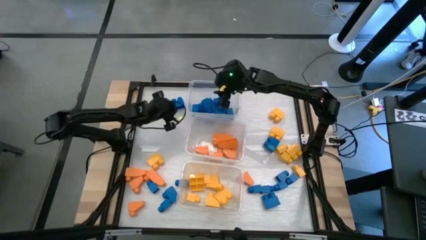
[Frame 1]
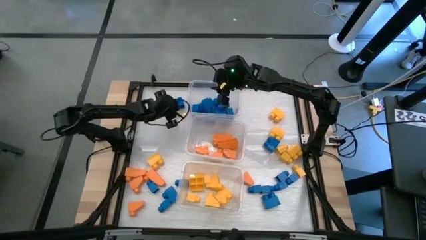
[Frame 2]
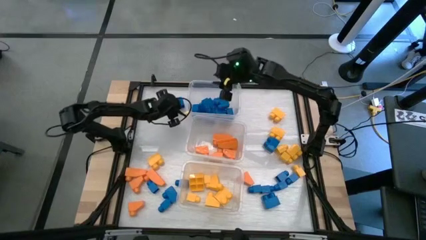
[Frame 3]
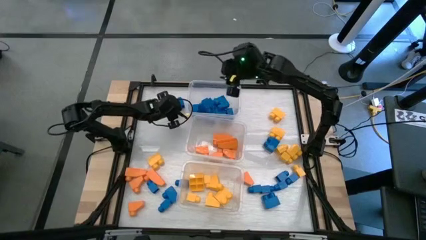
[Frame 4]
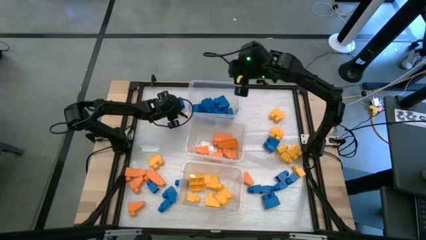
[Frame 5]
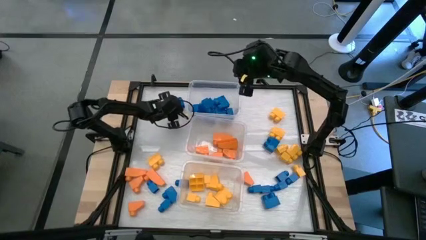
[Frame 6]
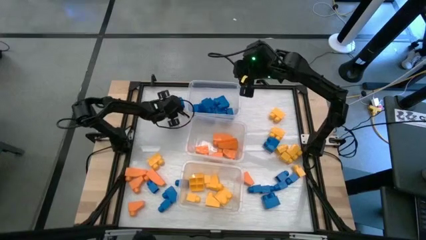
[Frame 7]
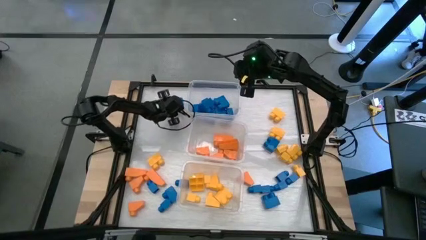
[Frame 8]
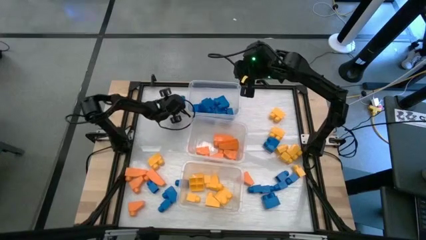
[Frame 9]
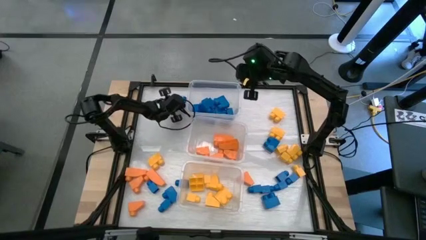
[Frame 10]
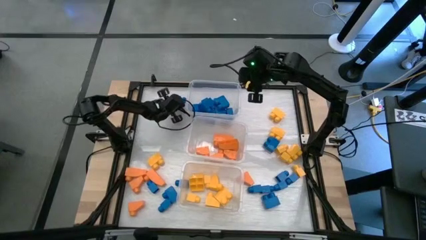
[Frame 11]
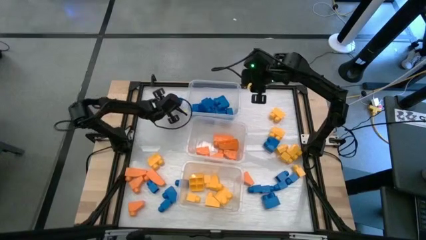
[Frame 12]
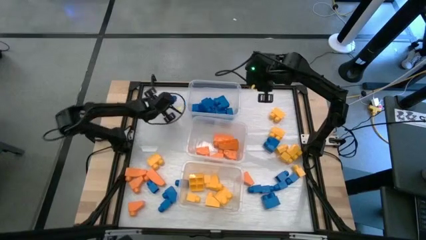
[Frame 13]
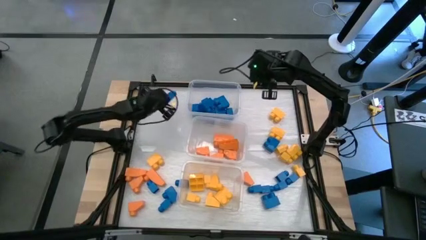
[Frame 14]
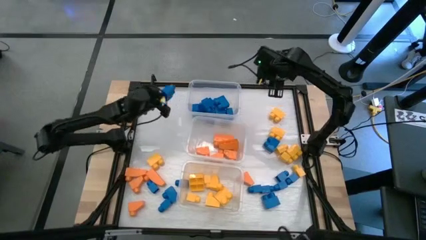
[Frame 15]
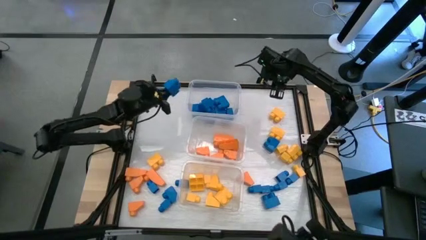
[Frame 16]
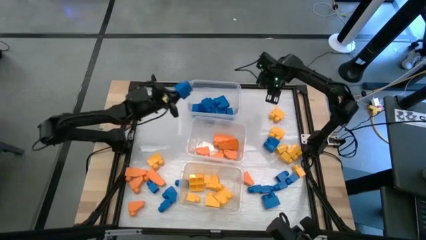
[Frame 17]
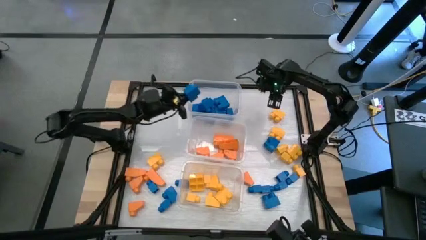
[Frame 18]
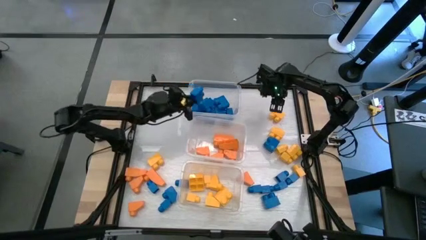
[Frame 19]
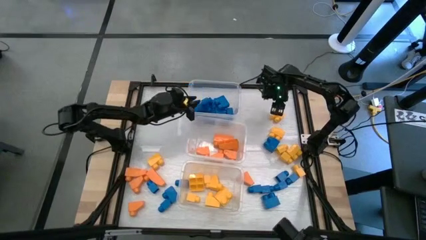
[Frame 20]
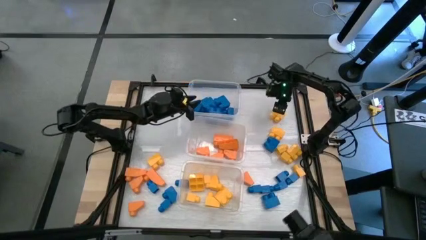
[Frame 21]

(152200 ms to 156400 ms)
Task: Sort blocks
Put the blue game piece into the top transparent bin

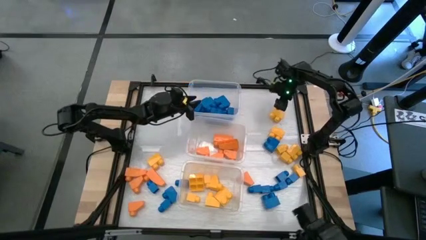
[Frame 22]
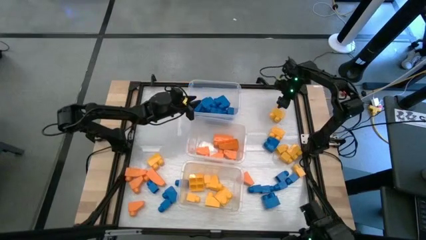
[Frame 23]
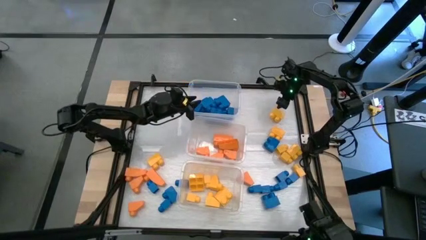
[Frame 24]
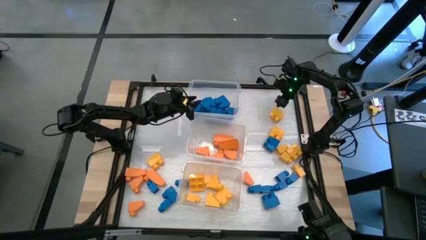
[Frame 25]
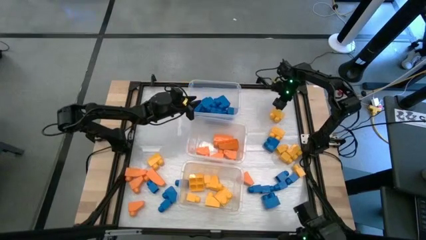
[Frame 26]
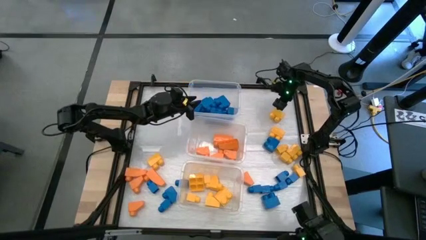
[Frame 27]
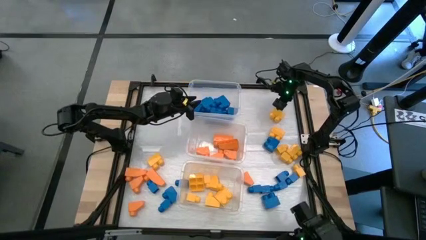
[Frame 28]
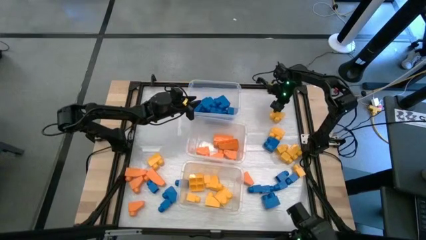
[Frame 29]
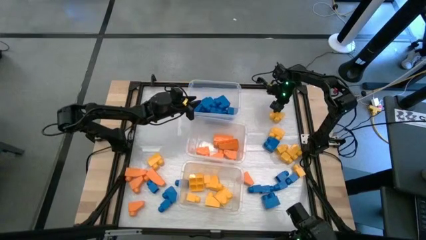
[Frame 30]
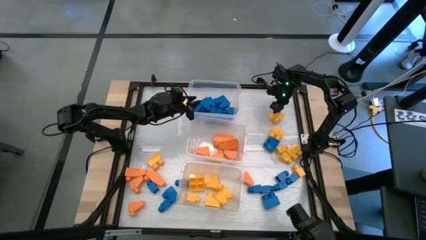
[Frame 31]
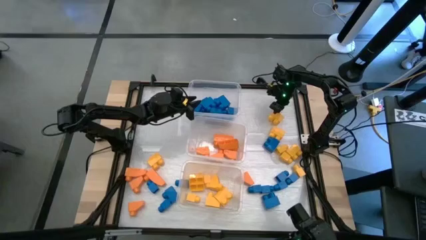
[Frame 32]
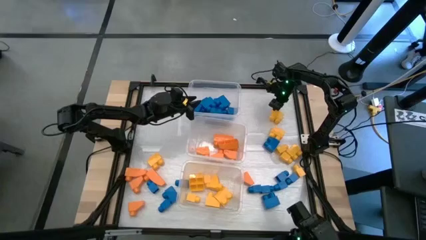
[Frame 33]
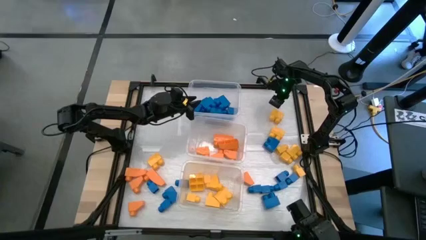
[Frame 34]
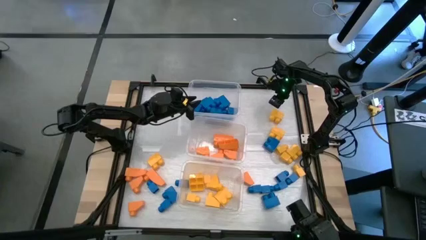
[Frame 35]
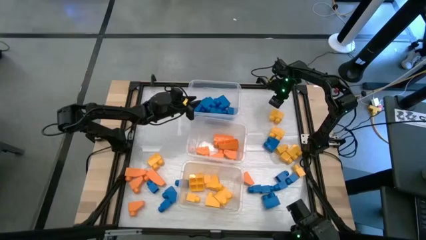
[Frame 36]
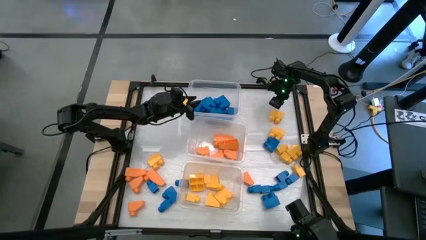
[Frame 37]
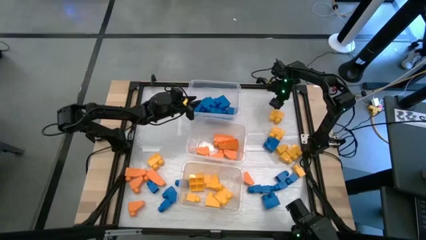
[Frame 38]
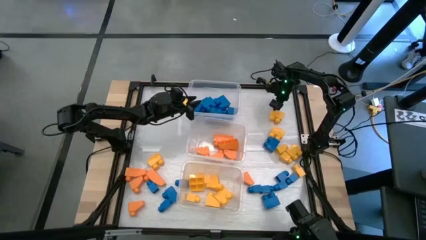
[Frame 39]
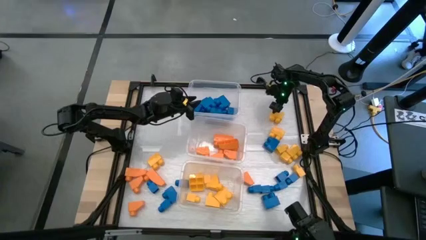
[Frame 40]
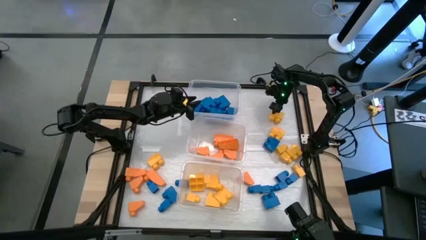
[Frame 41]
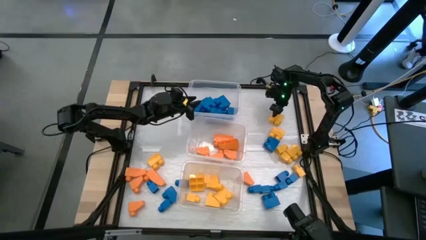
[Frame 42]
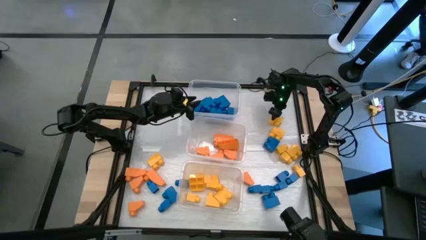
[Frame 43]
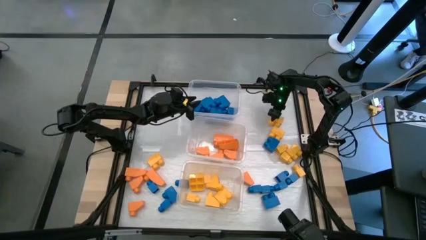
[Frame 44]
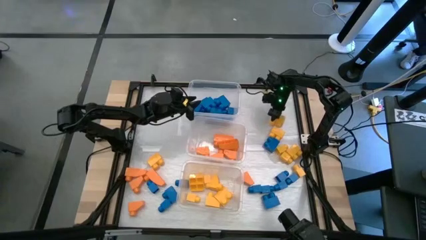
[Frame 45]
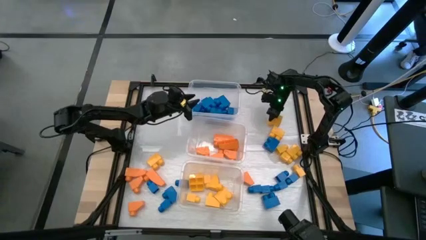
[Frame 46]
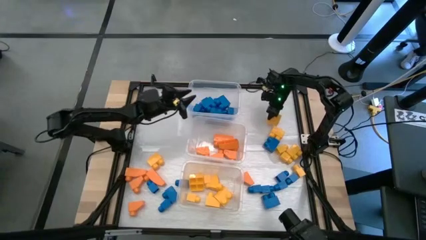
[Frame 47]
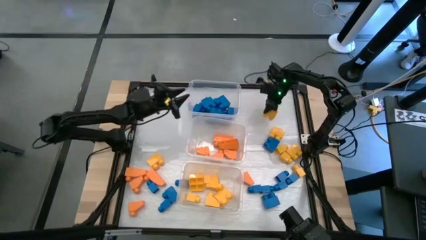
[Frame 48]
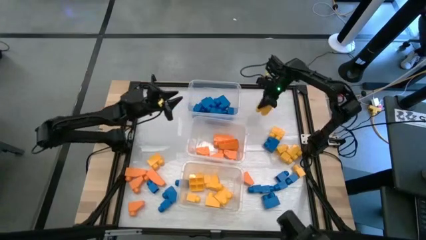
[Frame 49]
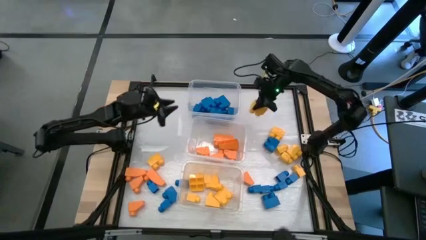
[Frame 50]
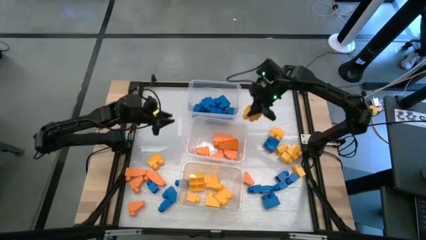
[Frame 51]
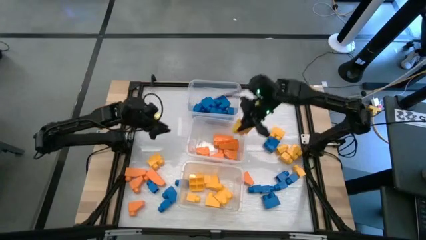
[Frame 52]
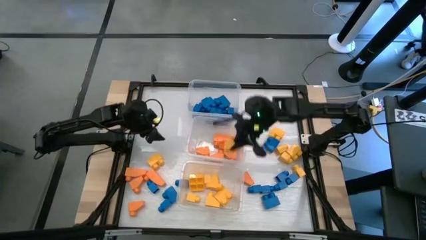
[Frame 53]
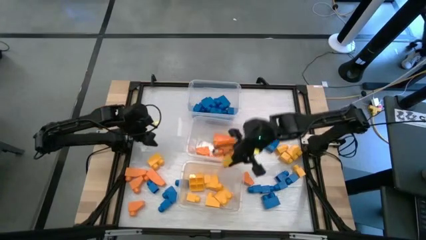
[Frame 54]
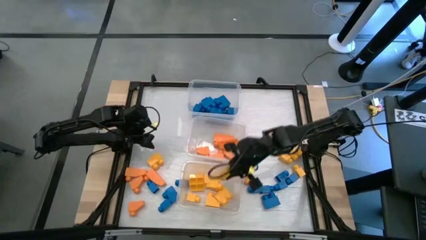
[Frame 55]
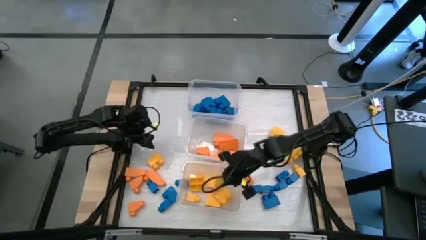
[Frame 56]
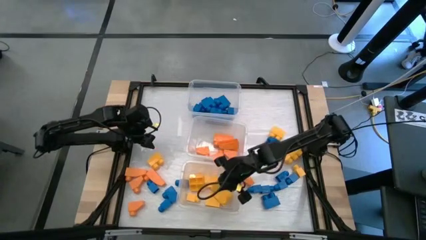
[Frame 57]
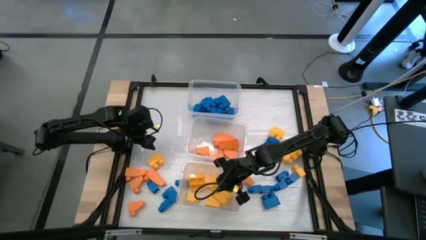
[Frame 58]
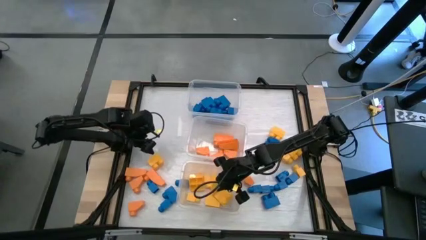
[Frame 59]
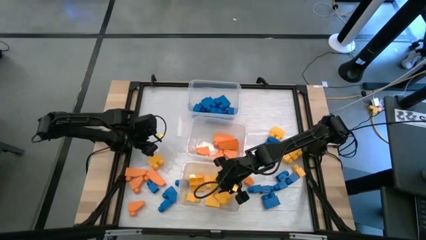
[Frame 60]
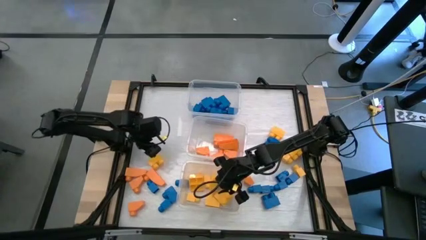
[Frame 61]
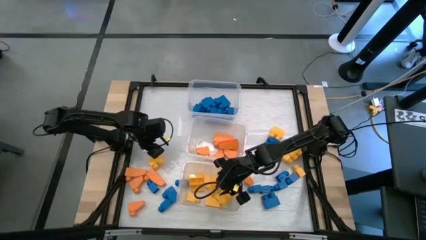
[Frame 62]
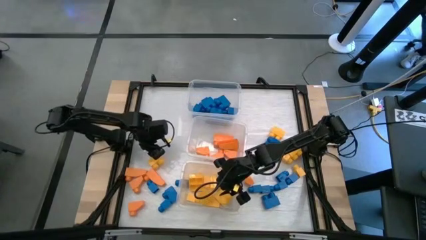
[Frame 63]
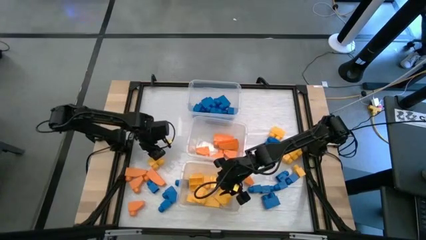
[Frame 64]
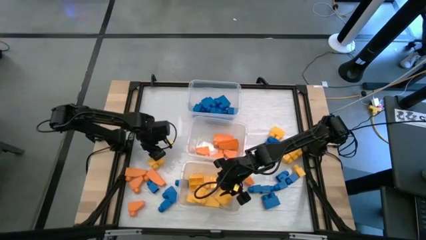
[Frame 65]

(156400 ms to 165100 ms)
Put the yellow game piece into the bottom transparent bin

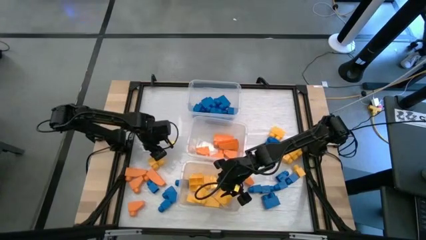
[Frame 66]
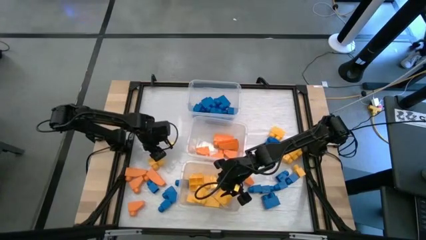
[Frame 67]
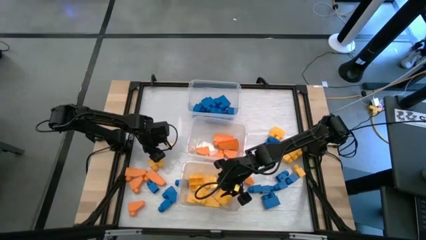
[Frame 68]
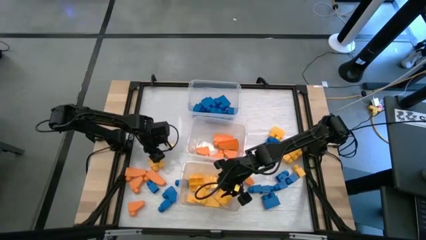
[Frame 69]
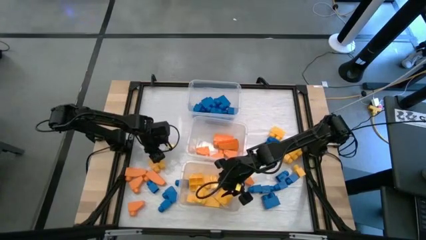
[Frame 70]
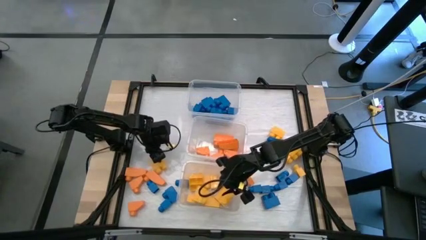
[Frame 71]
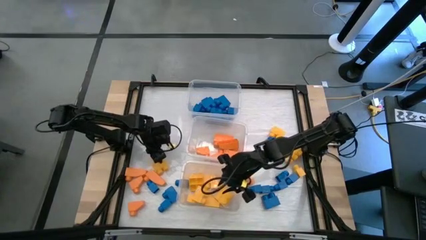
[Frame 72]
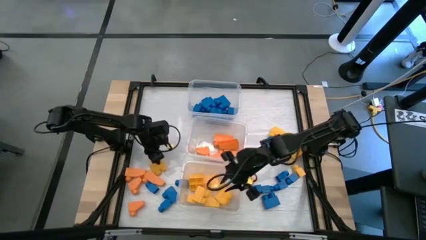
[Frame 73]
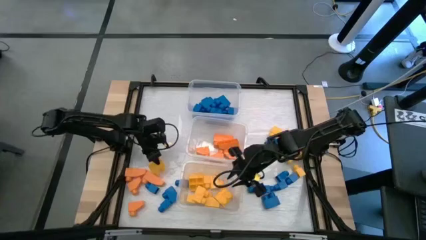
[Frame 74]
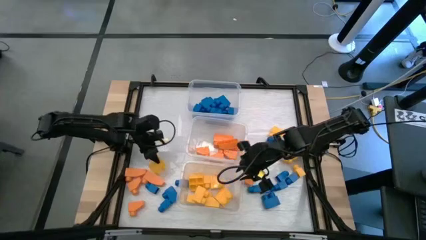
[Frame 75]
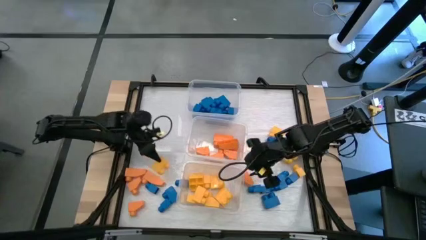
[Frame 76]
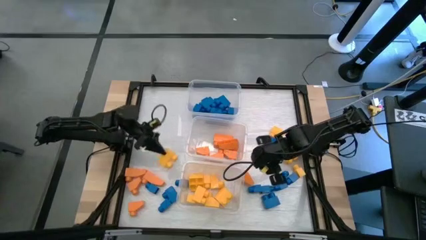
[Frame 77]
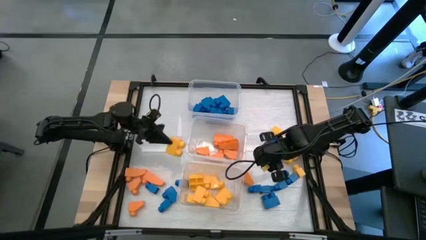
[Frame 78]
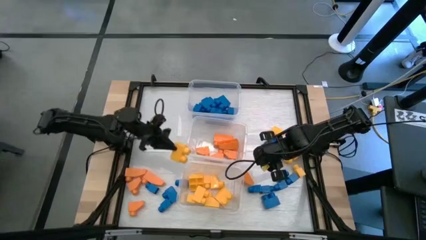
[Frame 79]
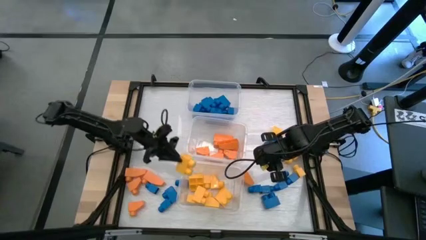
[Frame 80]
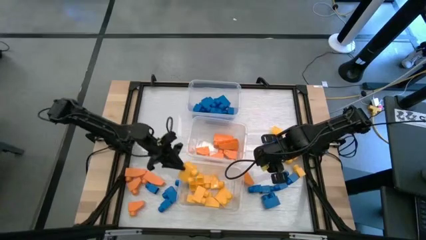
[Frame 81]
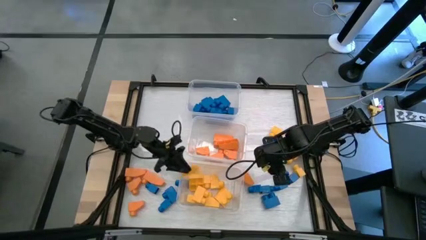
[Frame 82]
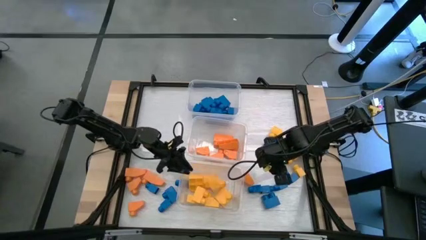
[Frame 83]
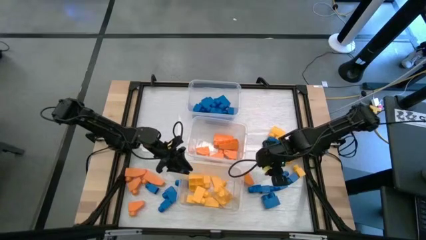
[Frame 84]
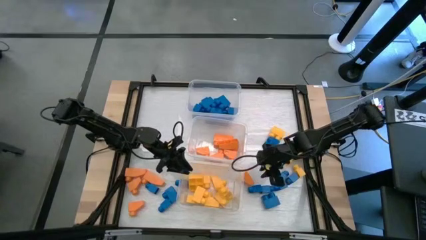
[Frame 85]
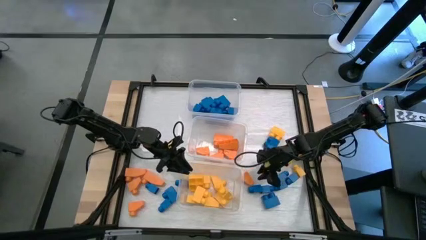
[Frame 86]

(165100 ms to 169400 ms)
Put the yellow game piece into the bottom transparent bin
